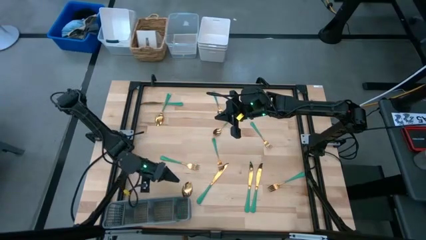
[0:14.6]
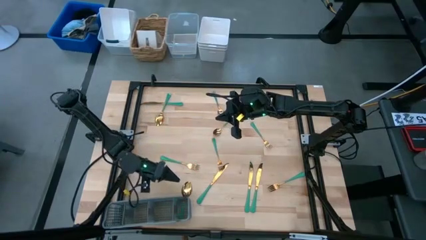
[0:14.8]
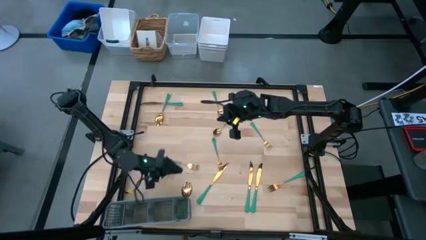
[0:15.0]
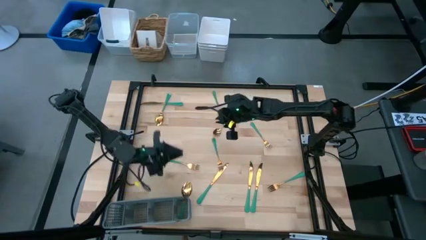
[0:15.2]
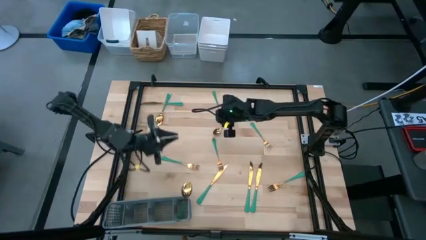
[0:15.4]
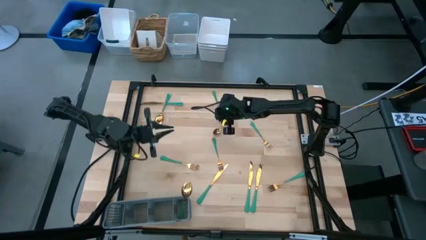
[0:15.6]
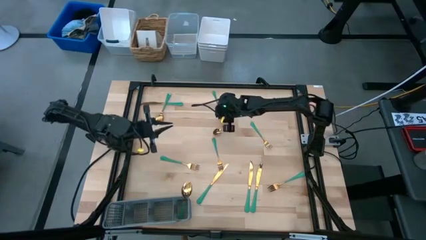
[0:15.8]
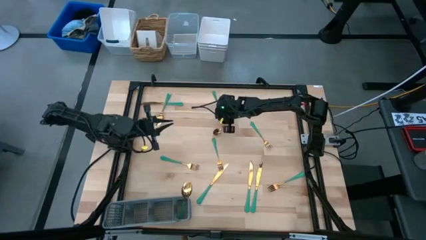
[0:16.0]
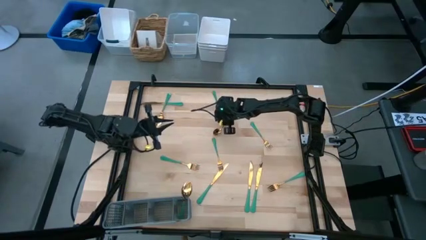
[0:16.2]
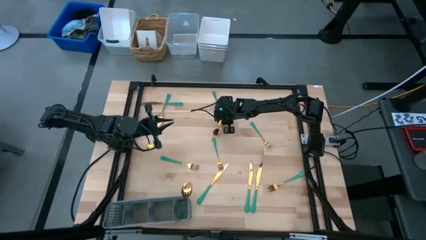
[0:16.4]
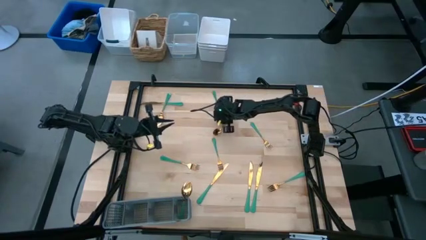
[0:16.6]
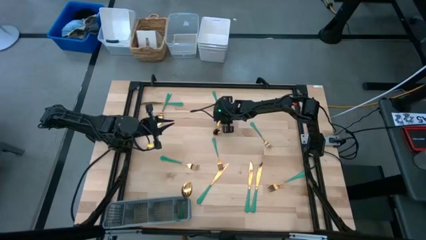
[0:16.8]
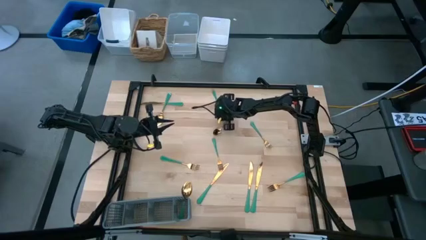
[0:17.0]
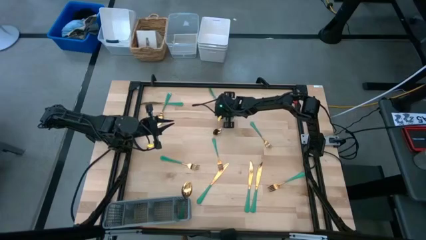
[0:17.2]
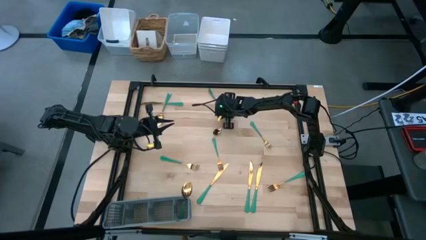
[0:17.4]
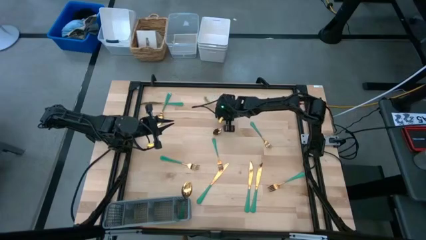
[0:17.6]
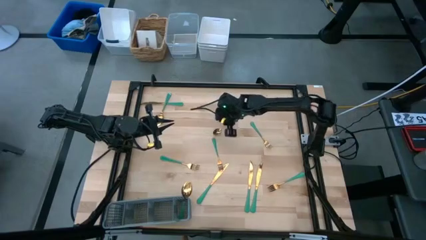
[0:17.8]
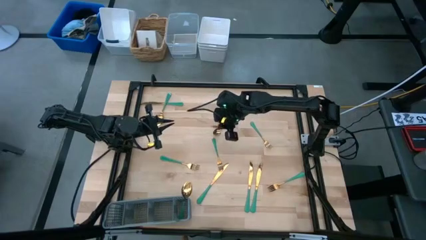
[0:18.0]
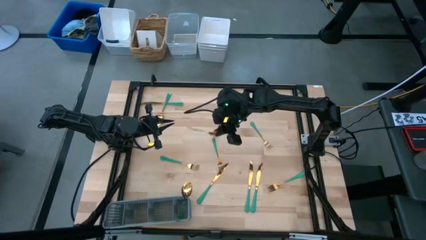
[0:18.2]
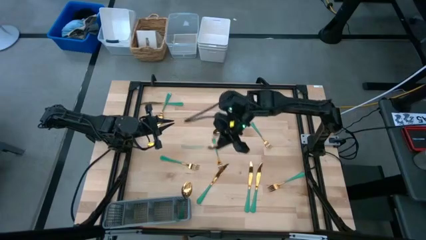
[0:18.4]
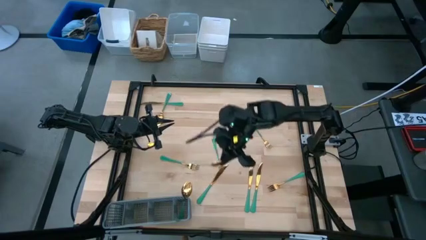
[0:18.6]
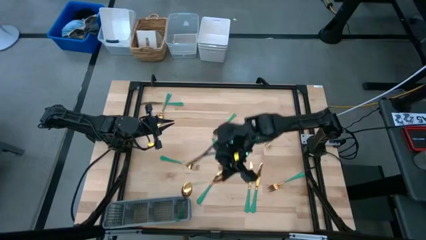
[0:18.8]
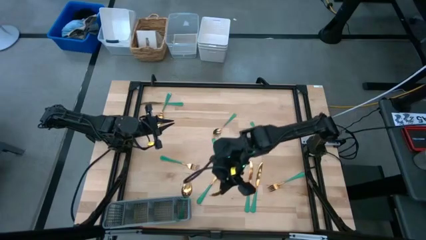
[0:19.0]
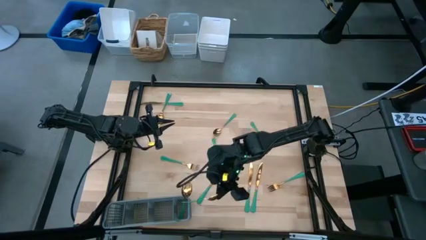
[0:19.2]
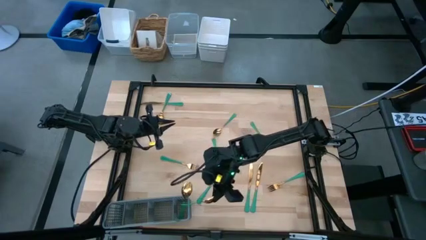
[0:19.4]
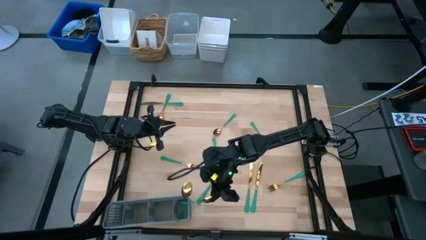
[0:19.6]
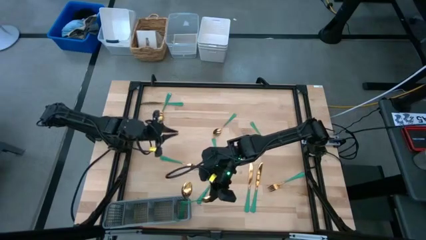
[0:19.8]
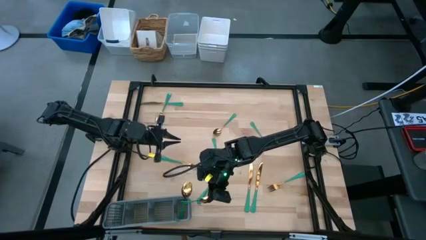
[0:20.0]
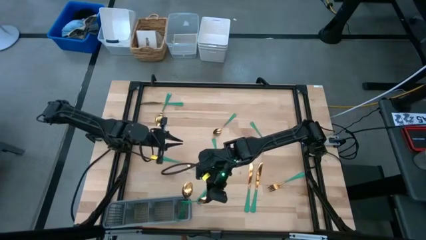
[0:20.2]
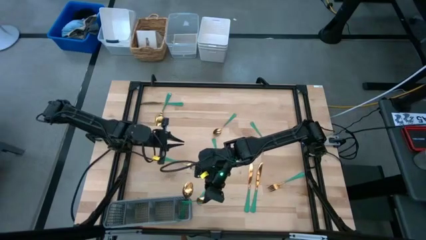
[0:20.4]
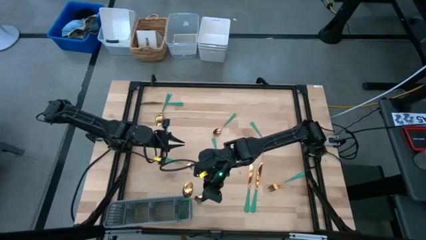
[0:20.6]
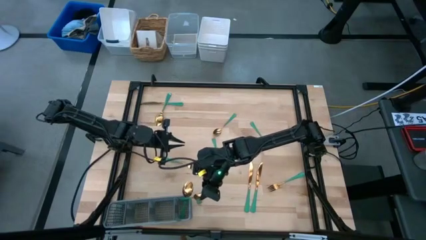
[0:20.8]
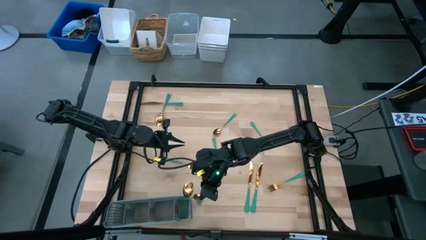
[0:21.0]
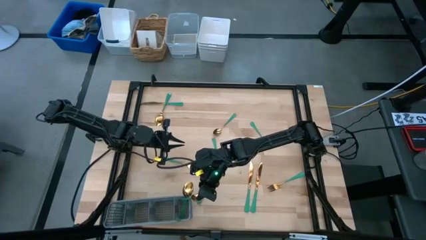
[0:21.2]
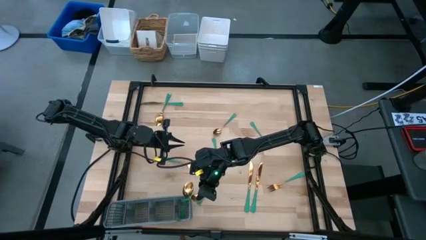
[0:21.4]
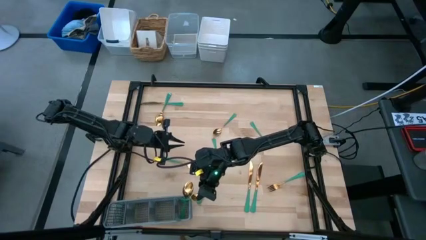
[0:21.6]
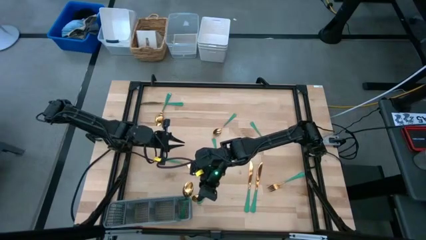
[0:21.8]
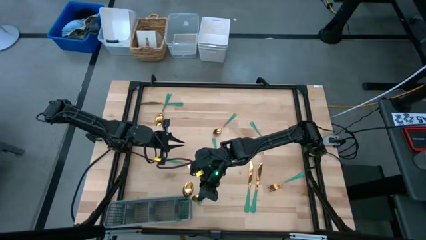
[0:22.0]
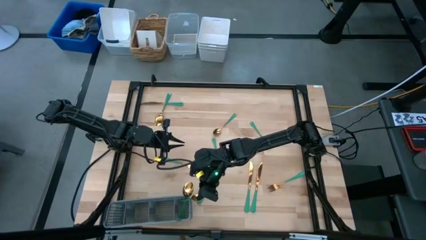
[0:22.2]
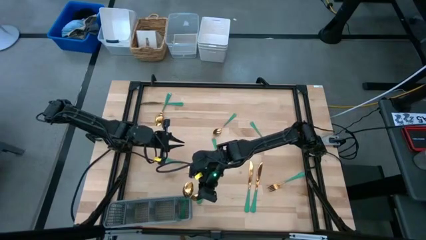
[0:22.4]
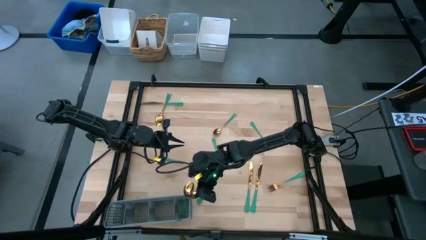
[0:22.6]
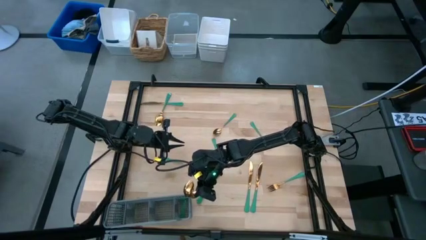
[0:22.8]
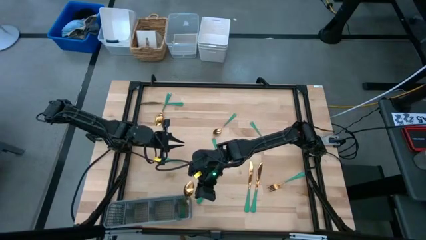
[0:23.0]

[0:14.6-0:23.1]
Task: Sort silverware
Put the top spoon into the cutlery rack

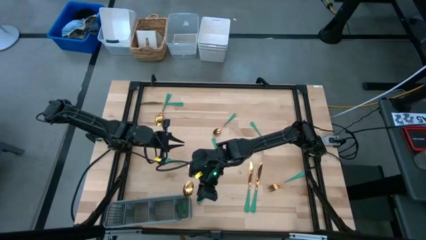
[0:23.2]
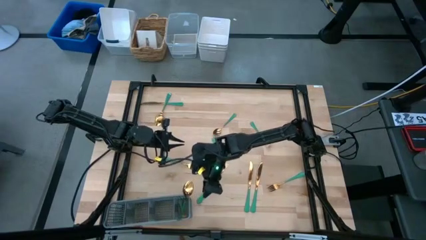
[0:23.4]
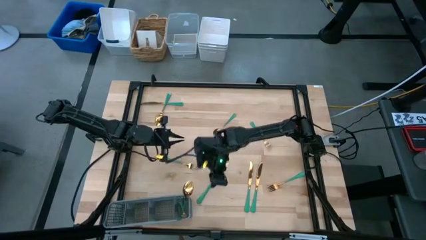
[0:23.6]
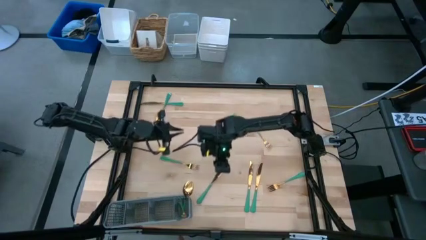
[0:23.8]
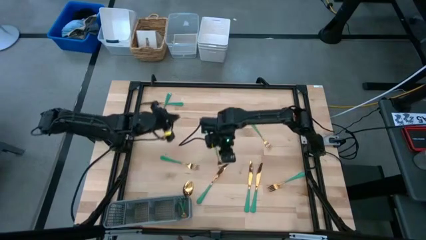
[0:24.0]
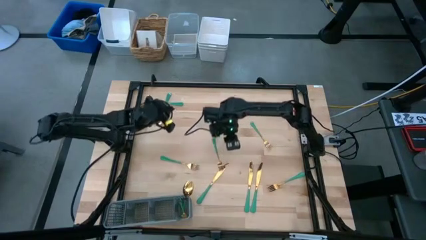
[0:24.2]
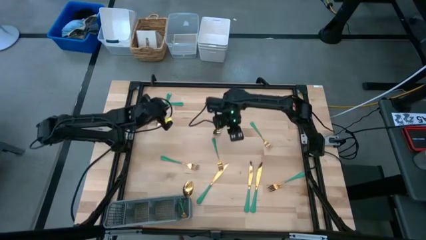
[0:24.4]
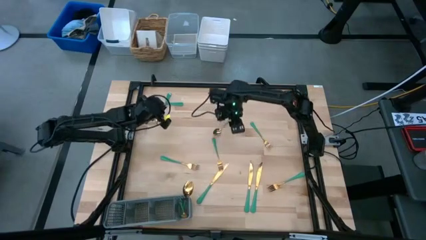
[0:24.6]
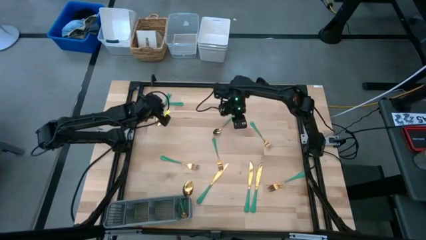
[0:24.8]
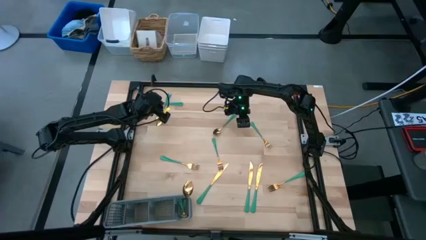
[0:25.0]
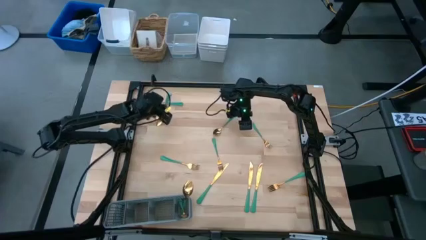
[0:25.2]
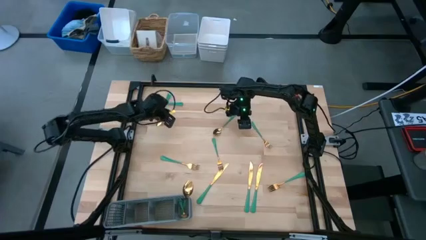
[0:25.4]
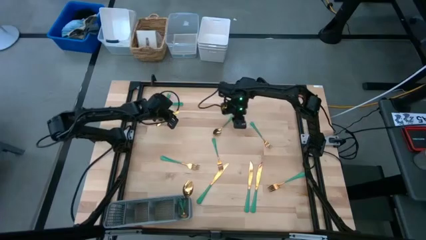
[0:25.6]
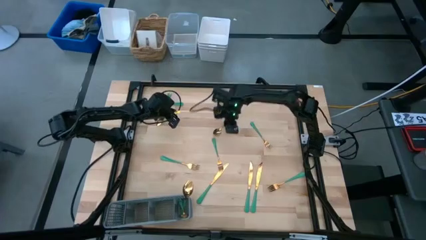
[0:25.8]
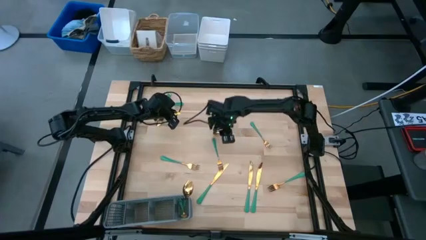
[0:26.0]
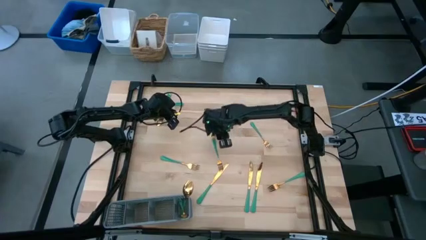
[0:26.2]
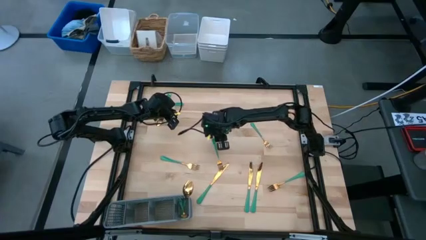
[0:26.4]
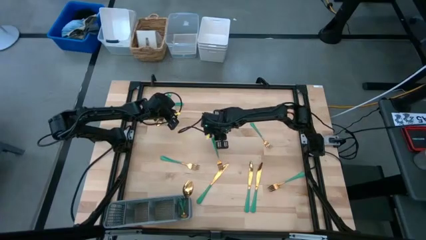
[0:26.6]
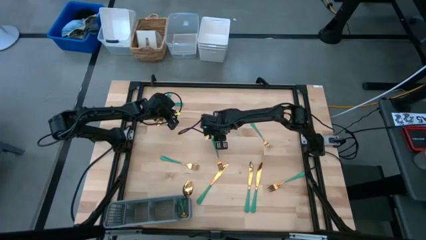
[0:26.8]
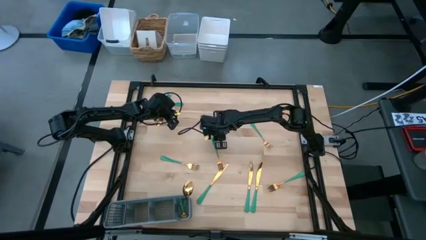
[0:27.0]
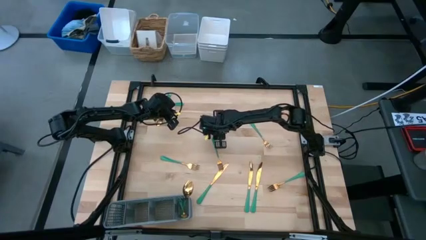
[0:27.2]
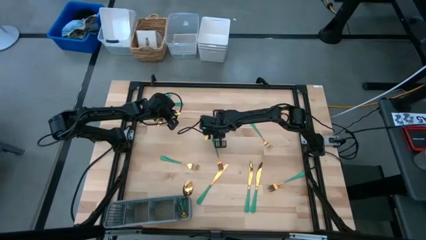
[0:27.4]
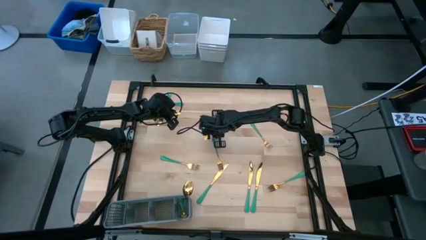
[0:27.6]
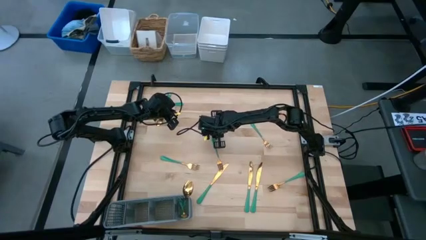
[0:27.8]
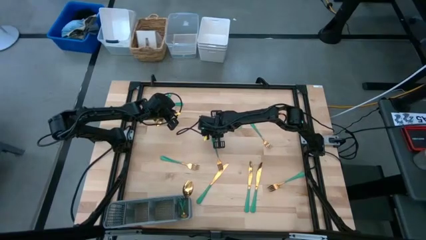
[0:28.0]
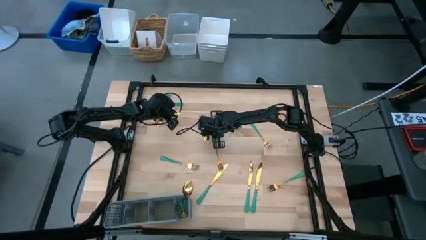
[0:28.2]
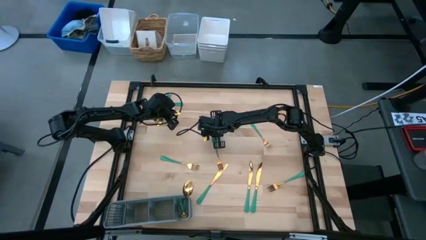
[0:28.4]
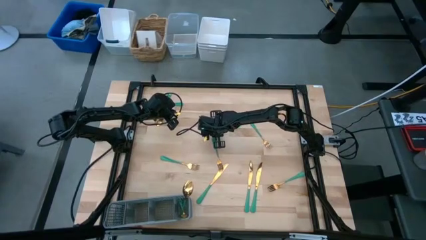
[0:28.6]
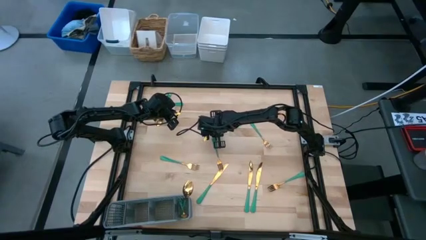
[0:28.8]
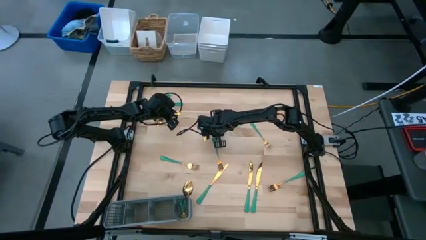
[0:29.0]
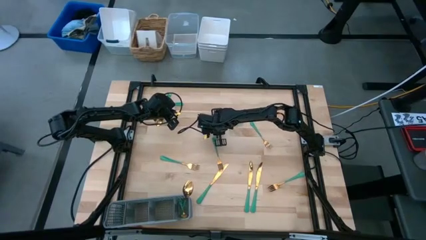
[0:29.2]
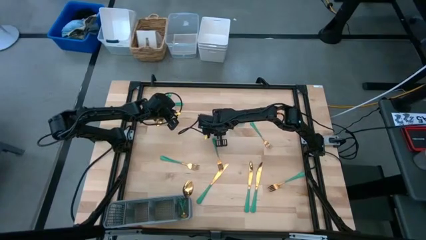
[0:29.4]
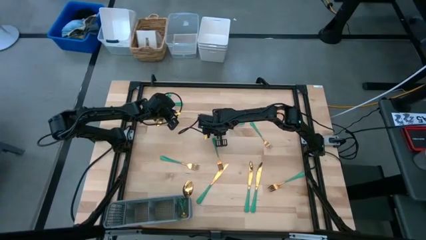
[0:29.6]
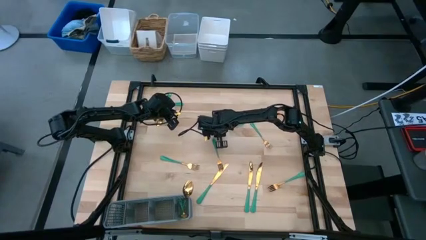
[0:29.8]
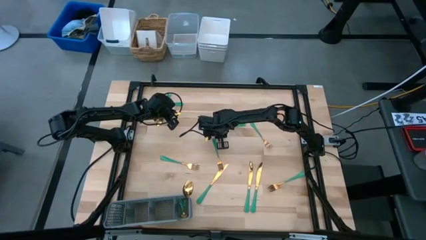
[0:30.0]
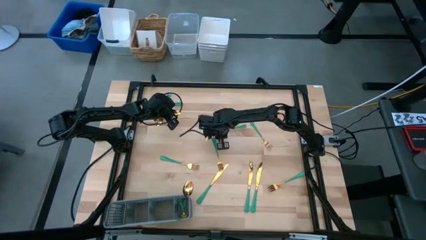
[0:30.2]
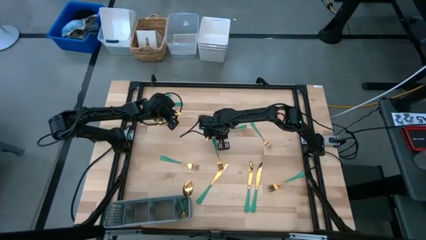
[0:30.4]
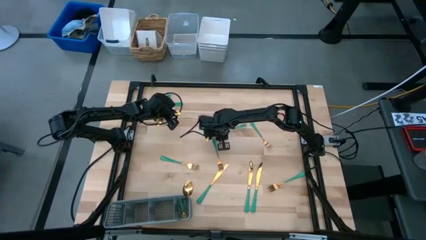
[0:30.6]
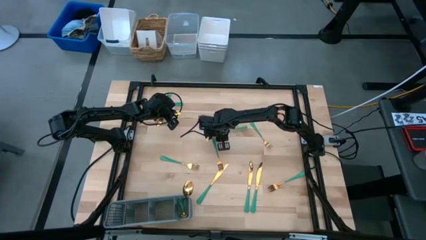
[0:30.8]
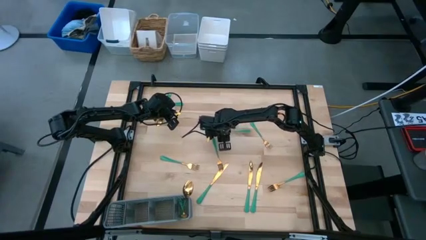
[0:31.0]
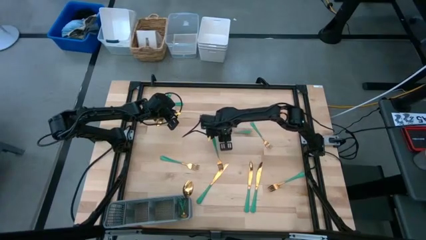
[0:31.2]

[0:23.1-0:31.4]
Put the right spoon into the cutlery rack
